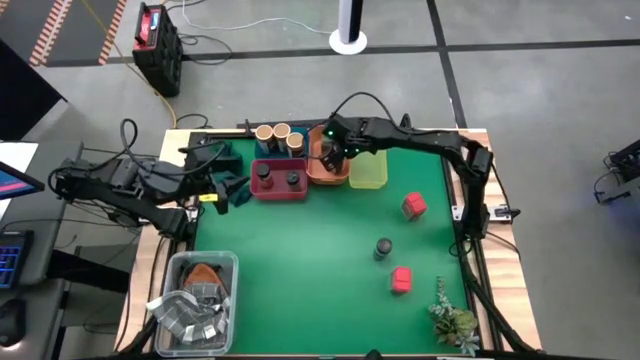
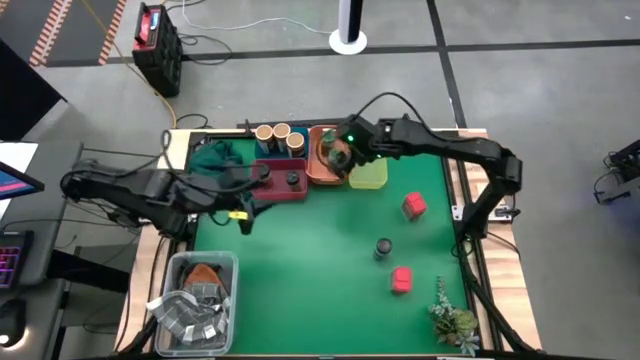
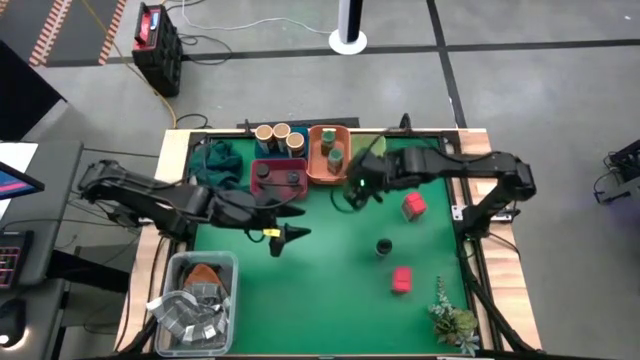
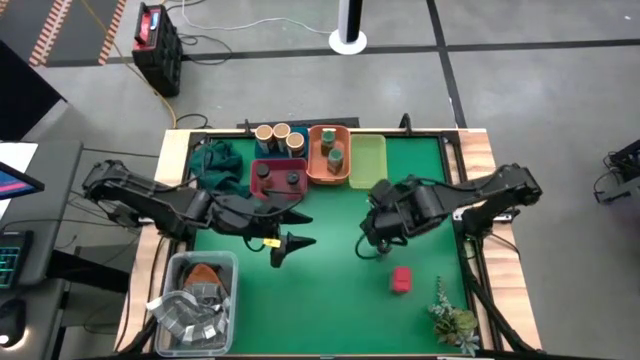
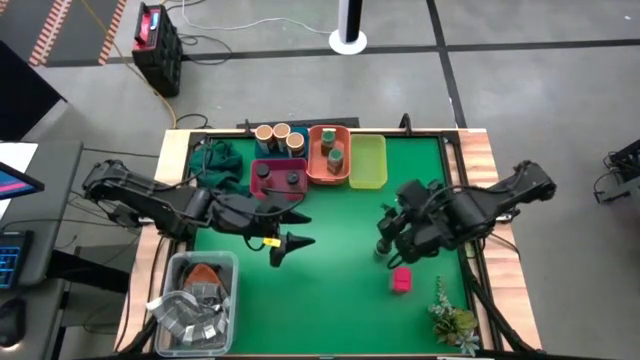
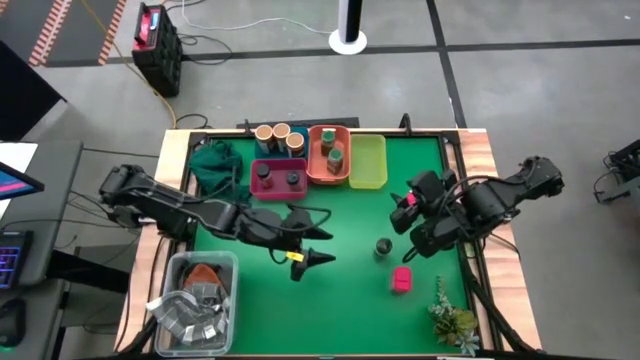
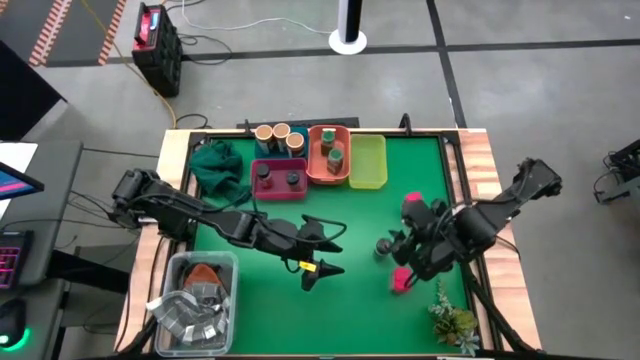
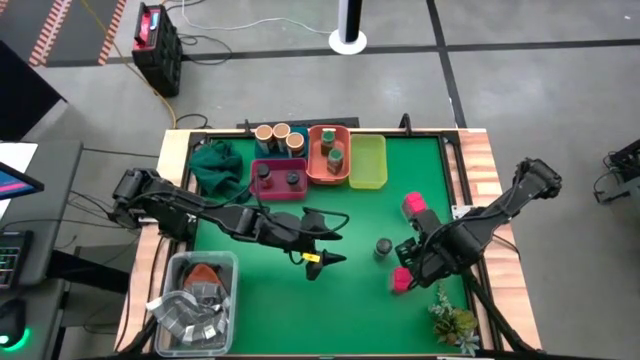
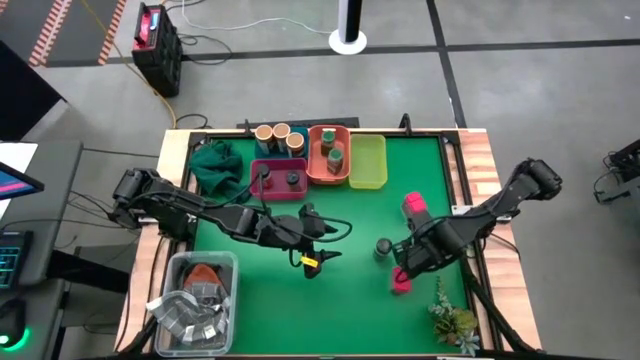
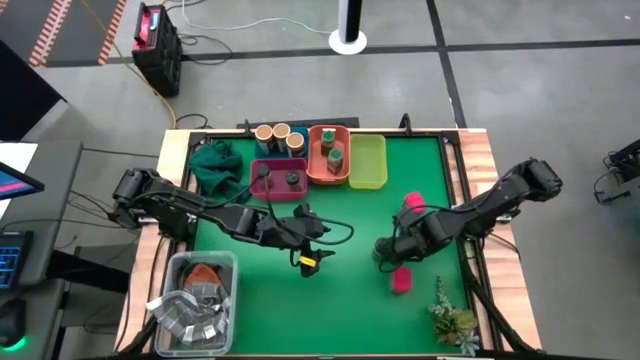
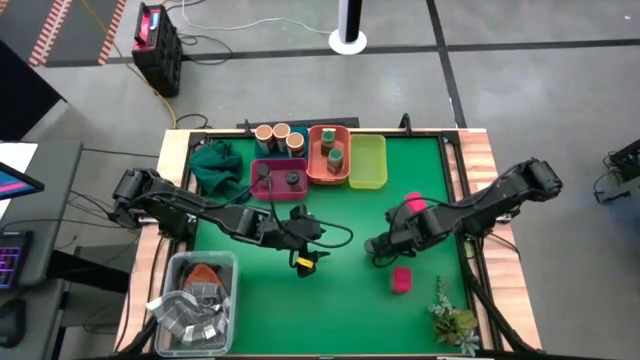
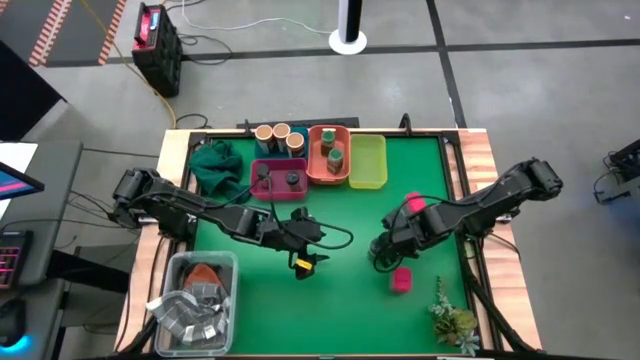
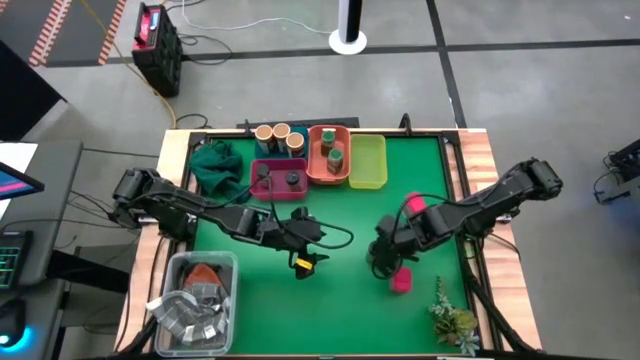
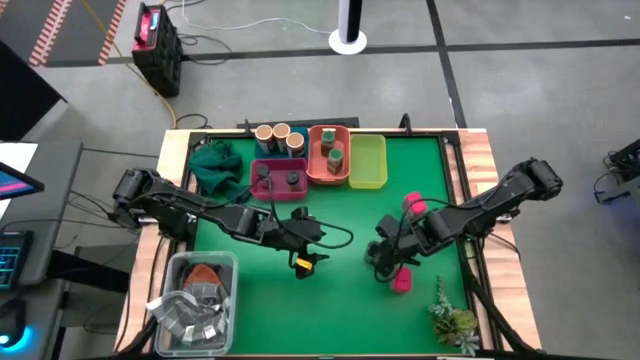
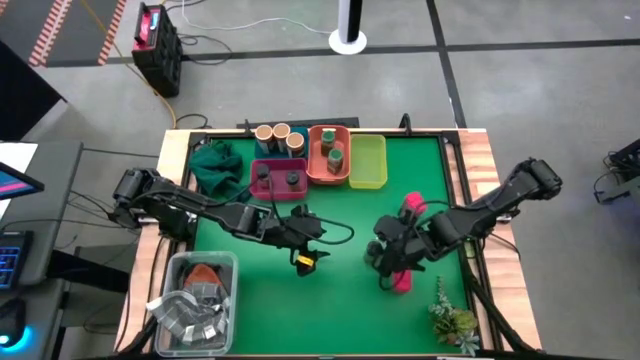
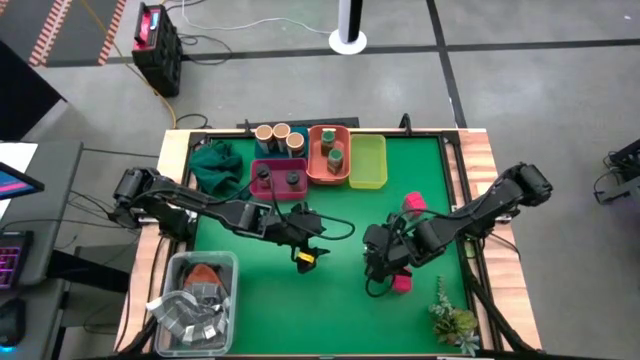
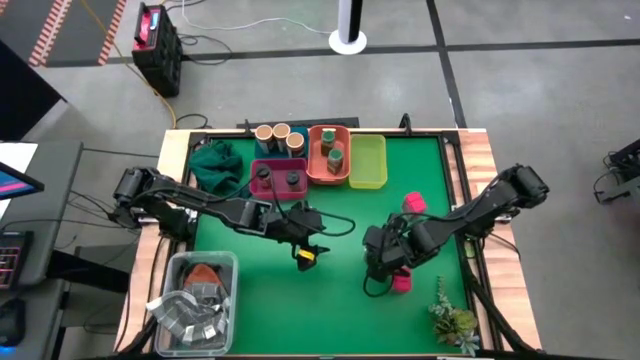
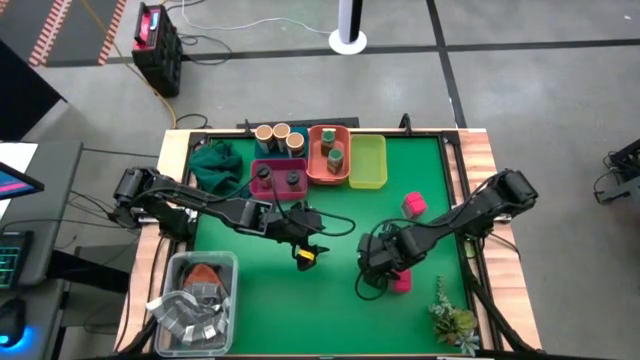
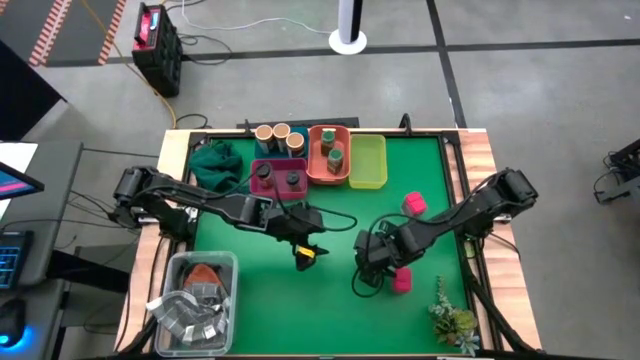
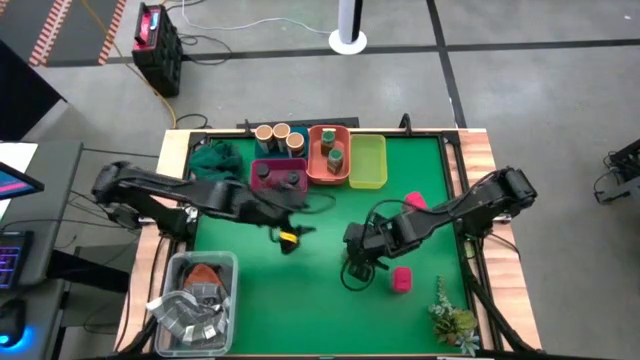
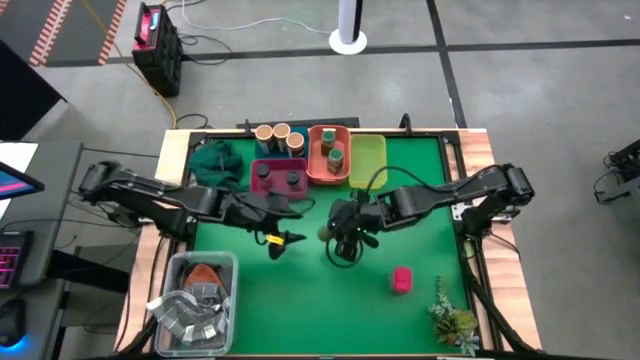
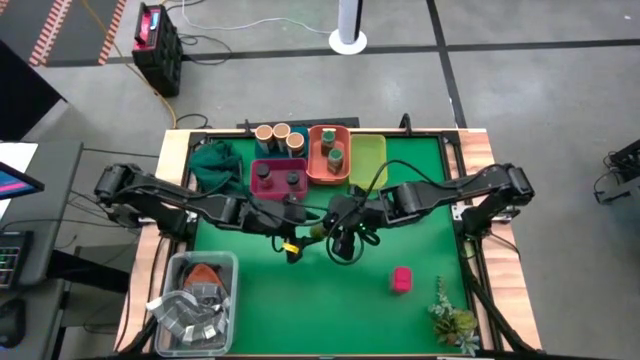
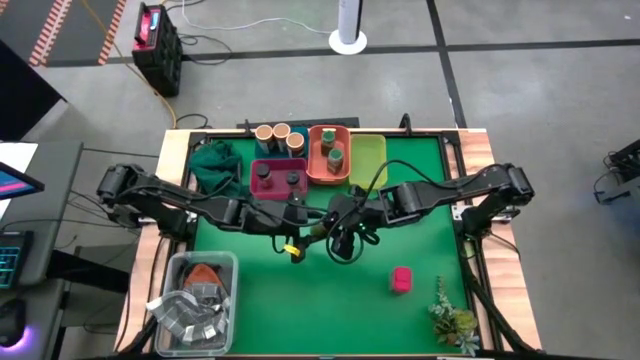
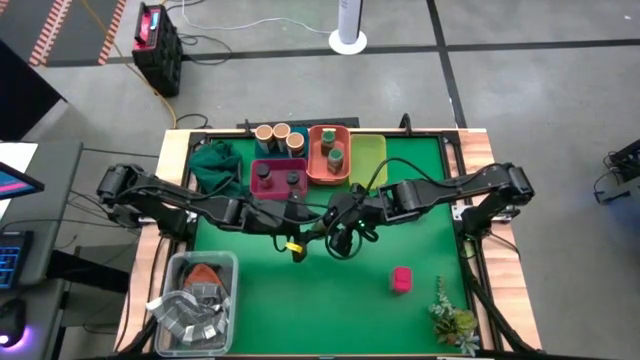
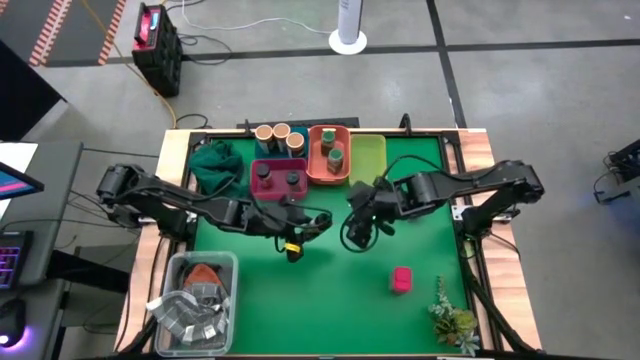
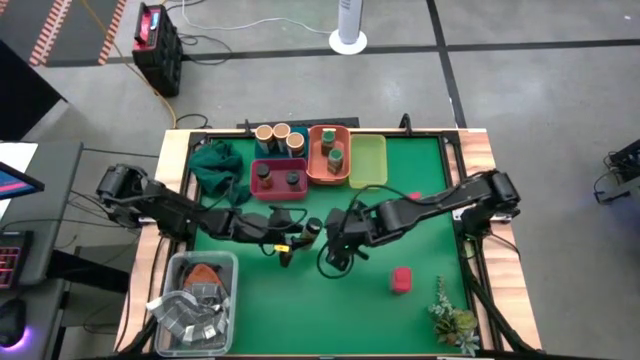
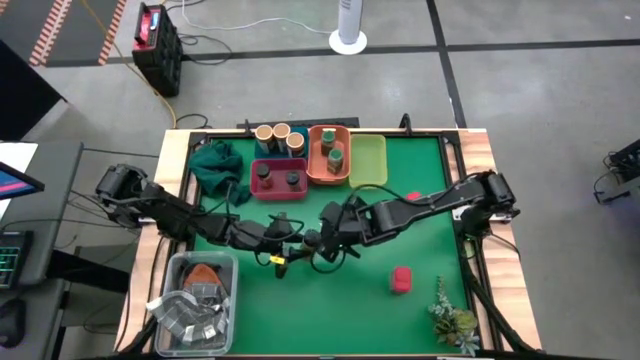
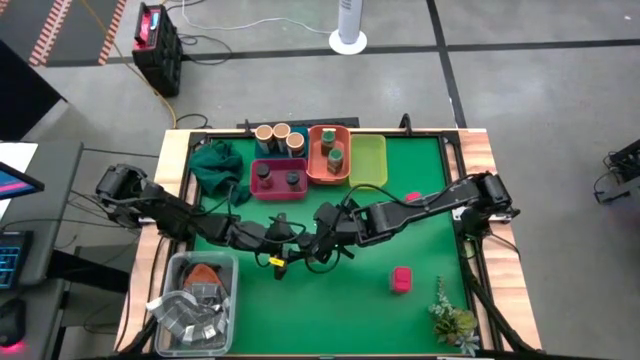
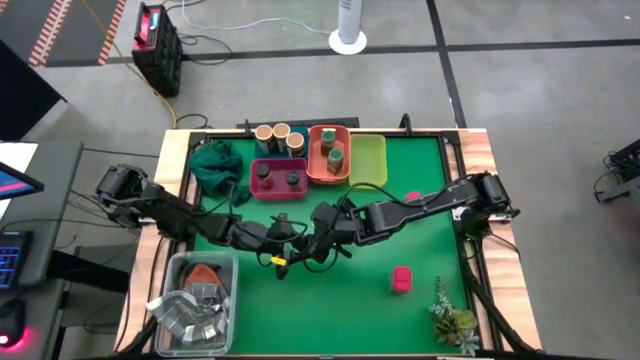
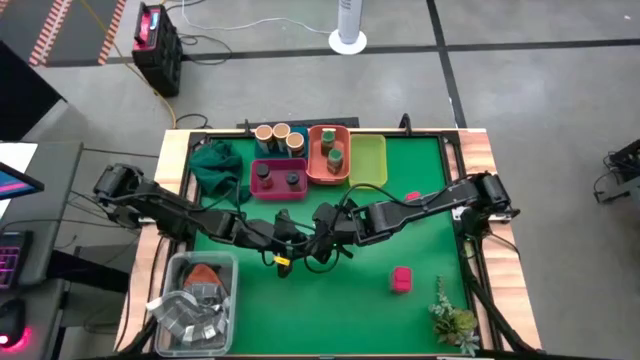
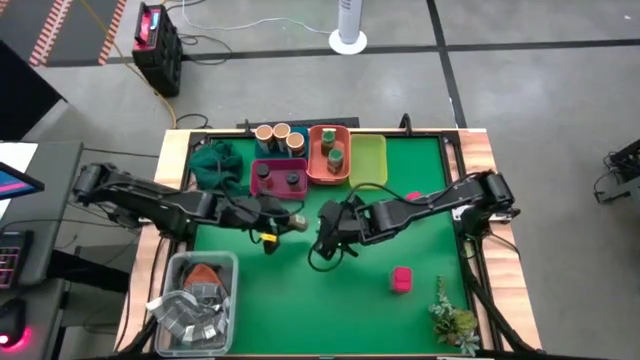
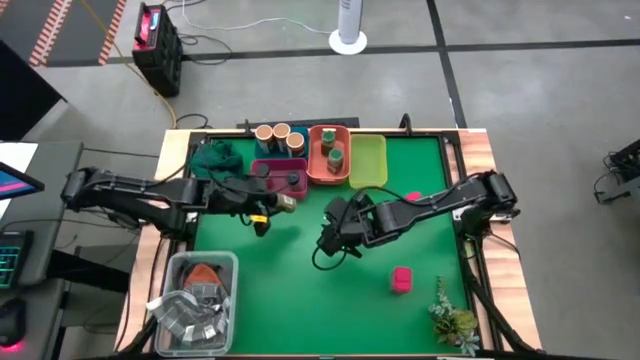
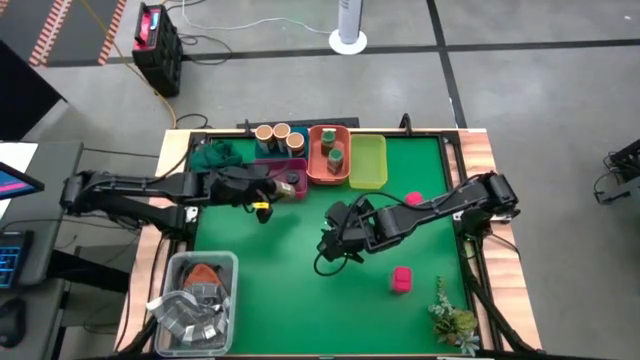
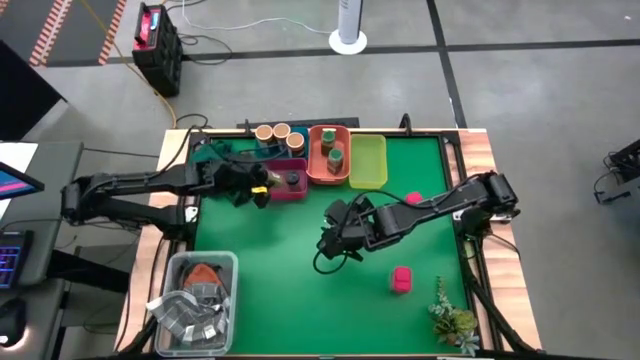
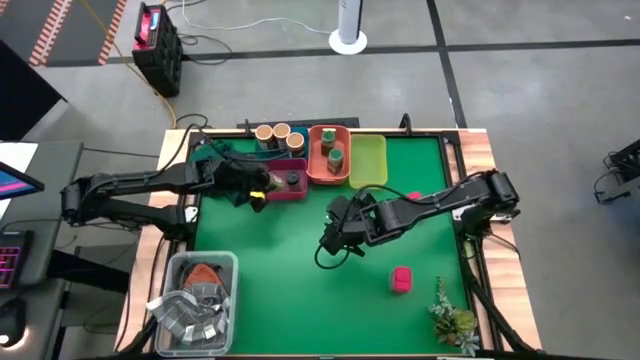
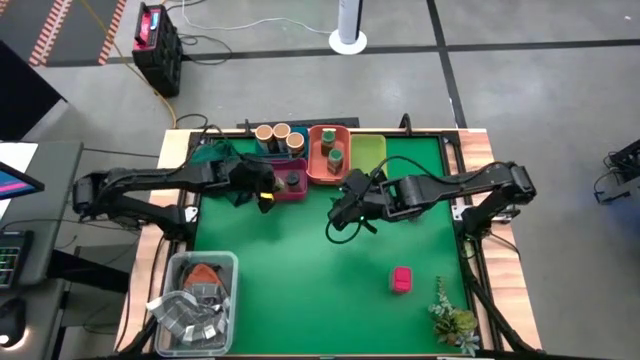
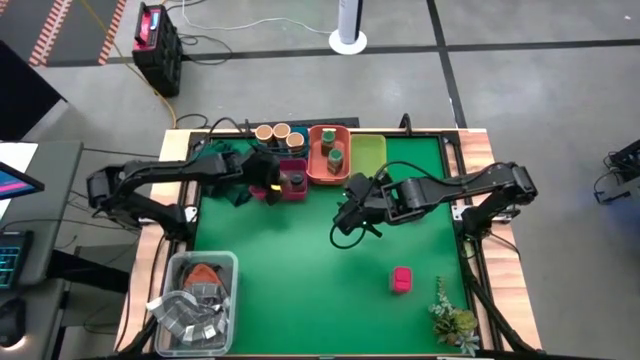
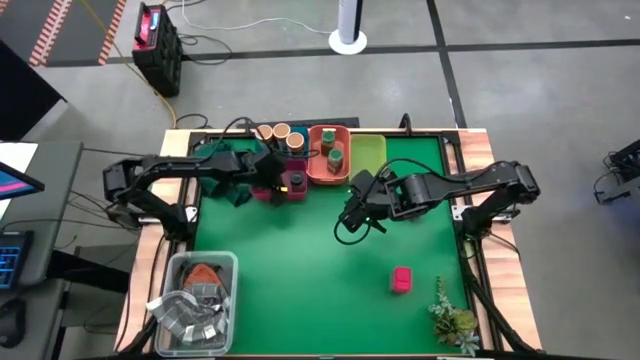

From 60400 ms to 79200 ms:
Task: Sort spices by type
Put the black seasoning bottle into the red bin

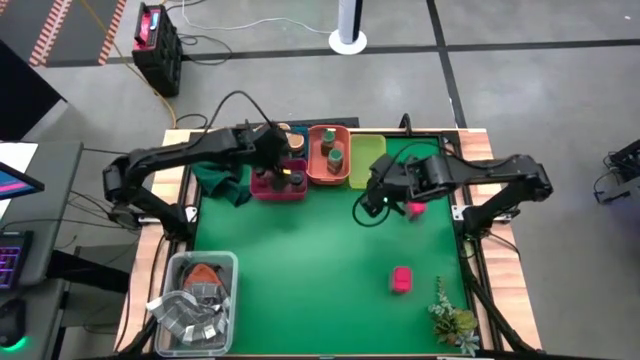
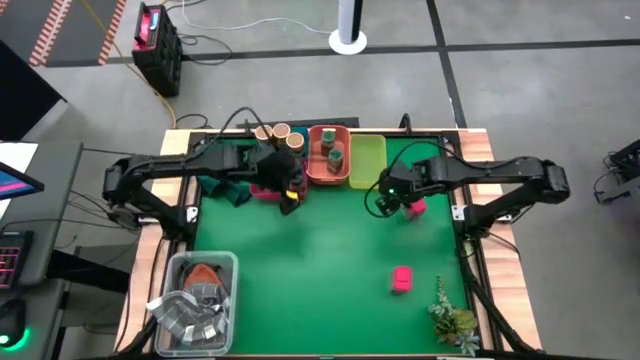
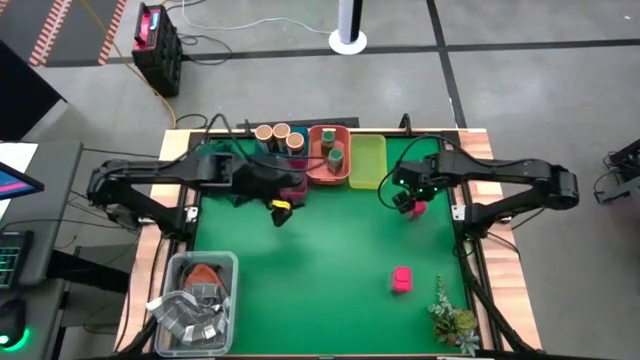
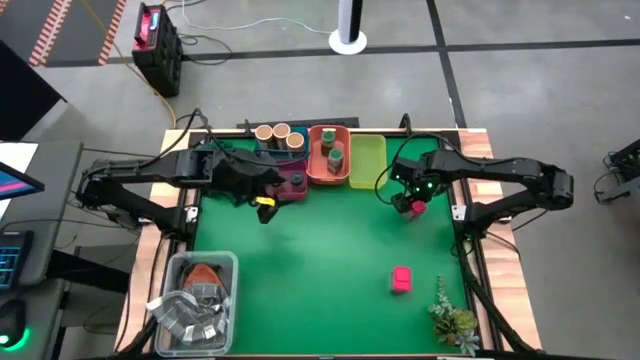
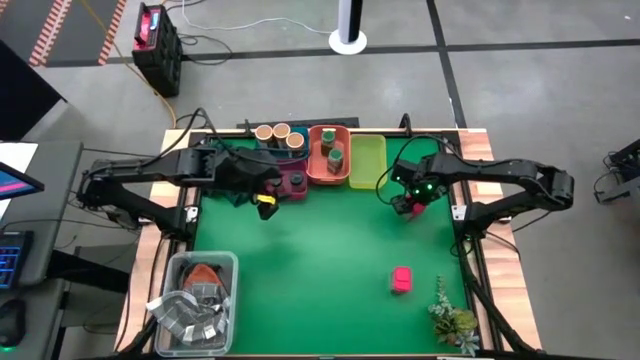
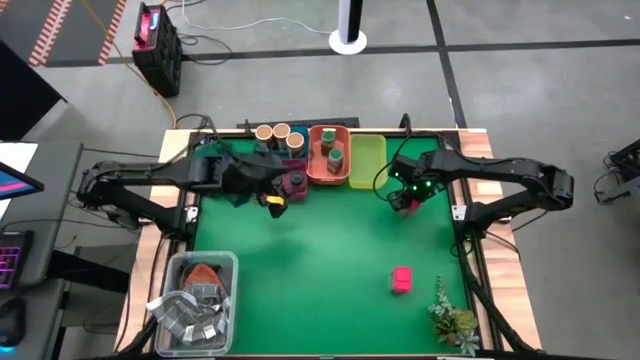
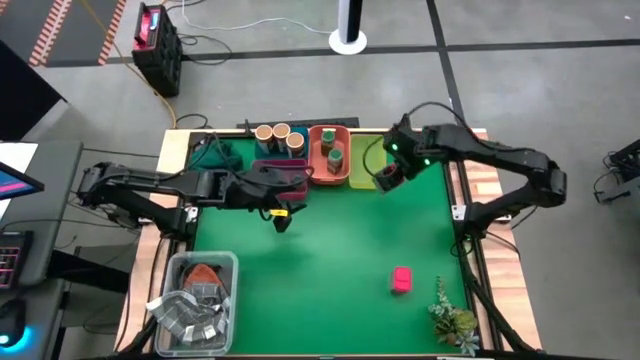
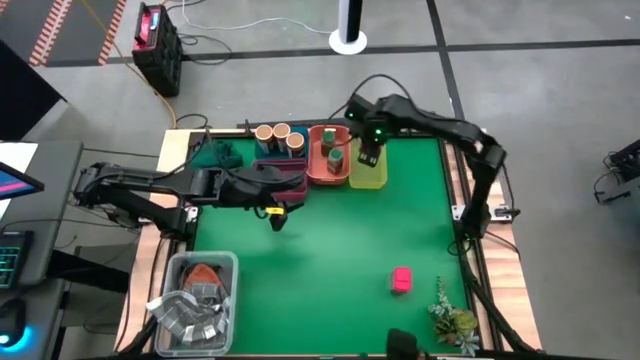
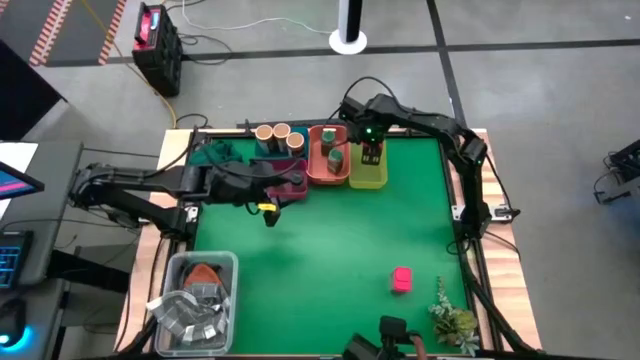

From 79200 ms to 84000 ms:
Put the top red seasoning can into the yellow bin
